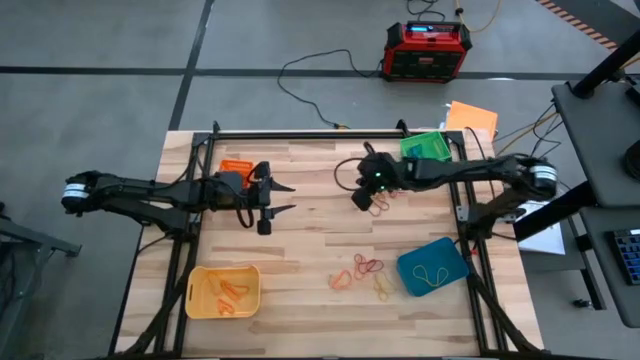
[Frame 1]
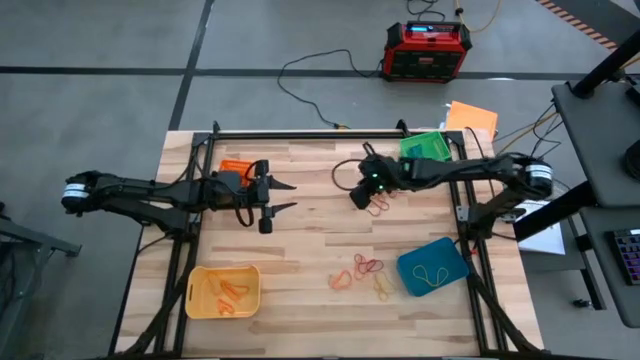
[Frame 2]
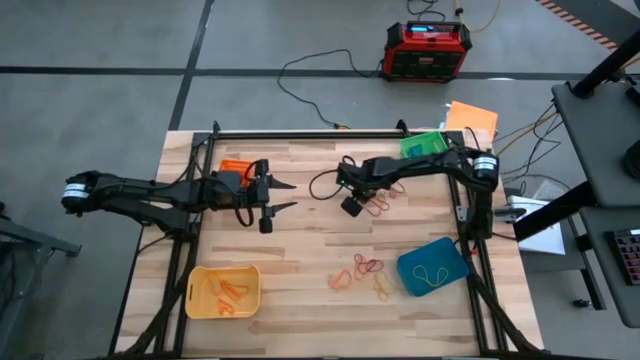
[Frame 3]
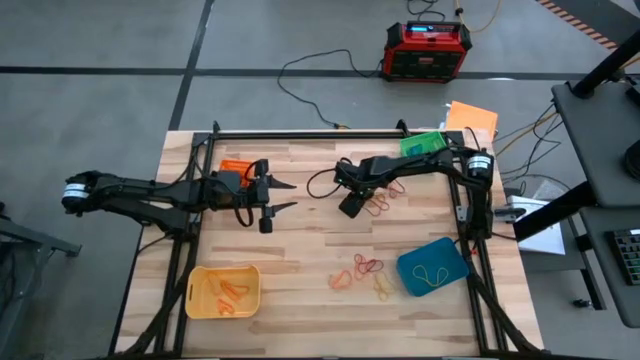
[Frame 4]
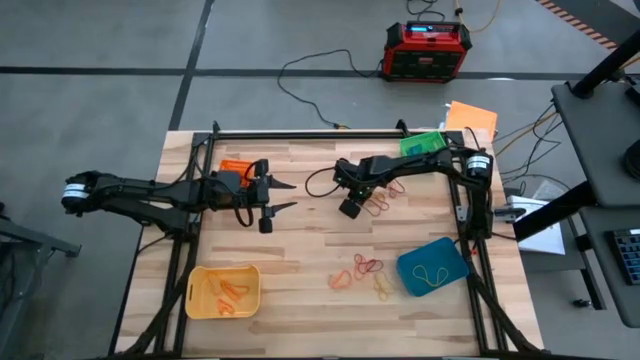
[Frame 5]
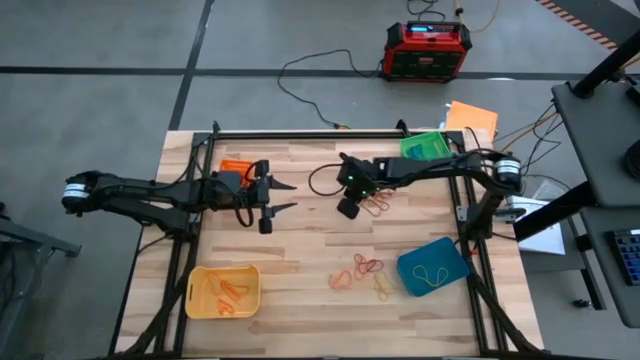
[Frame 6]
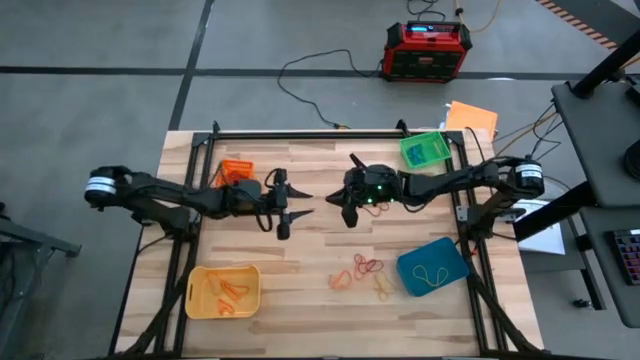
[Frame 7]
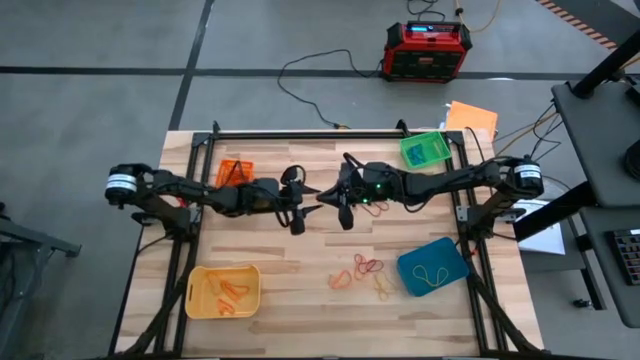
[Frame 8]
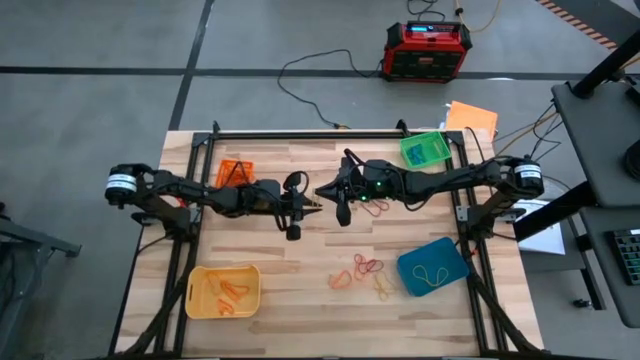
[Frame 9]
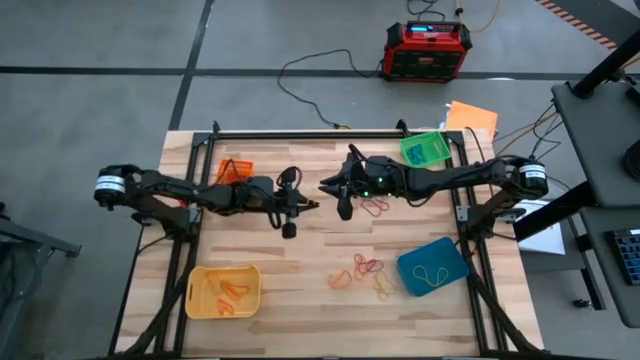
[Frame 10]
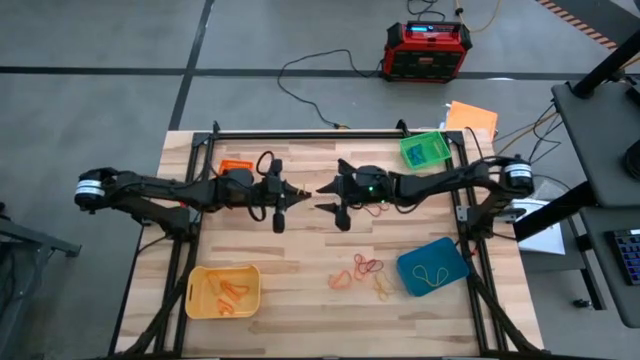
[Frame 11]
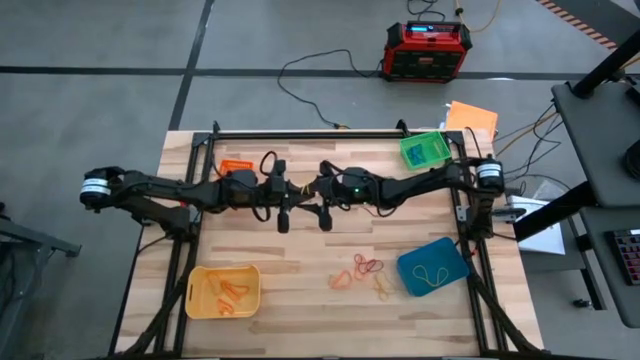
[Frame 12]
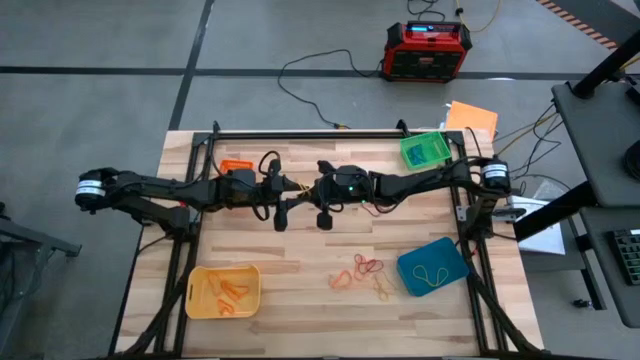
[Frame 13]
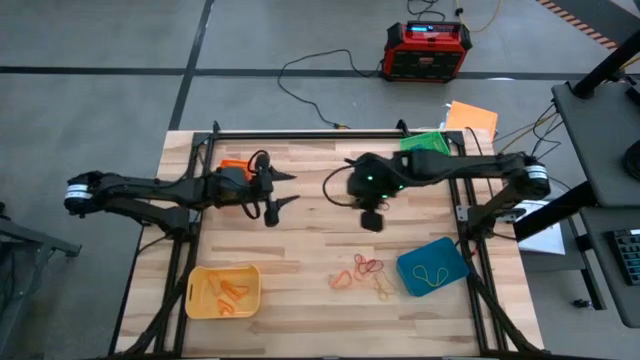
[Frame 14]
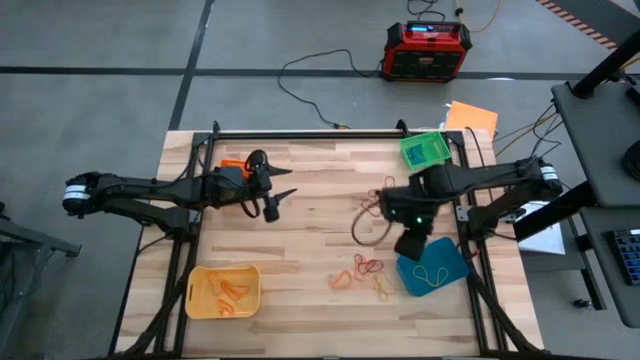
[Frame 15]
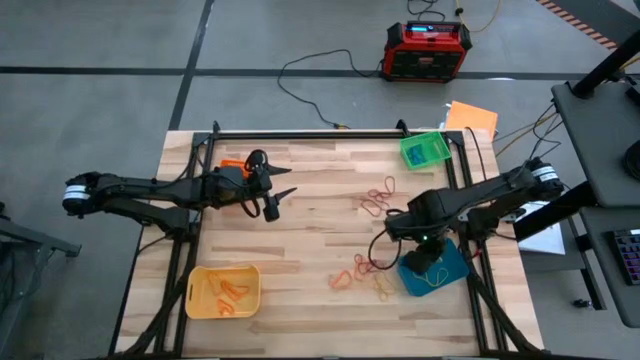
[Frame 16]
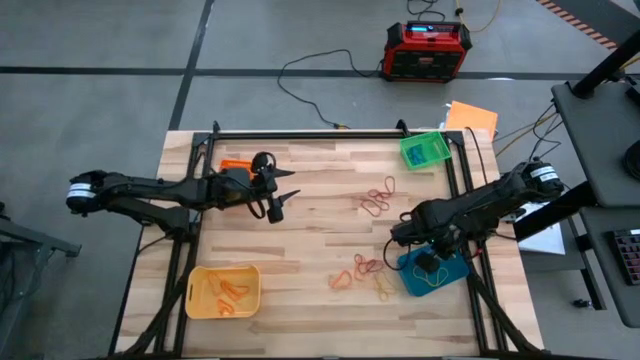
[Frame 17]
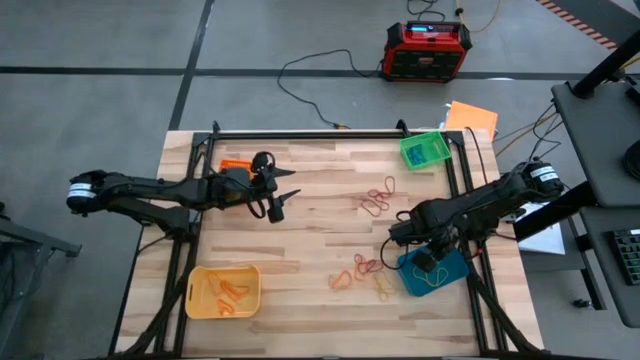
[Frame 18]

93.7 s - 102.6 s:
Task: Sort rubber bands into baskets
Put the yellow rubber band into the blue bin

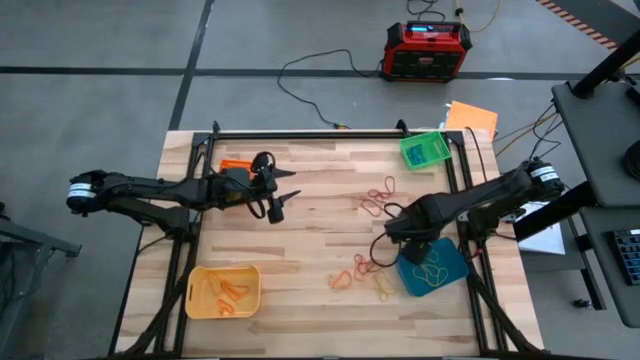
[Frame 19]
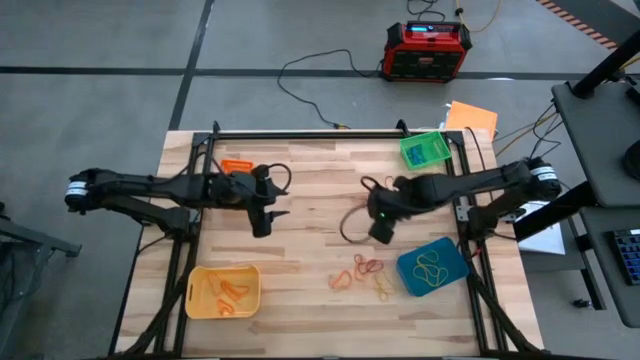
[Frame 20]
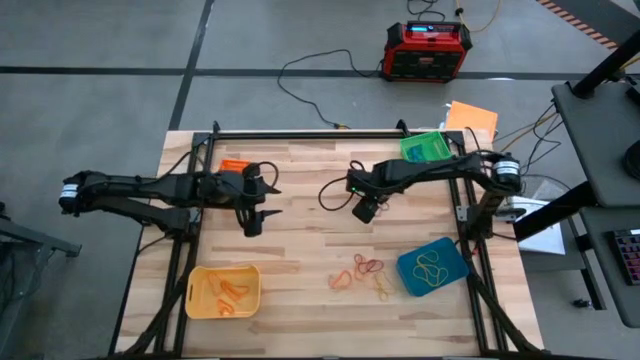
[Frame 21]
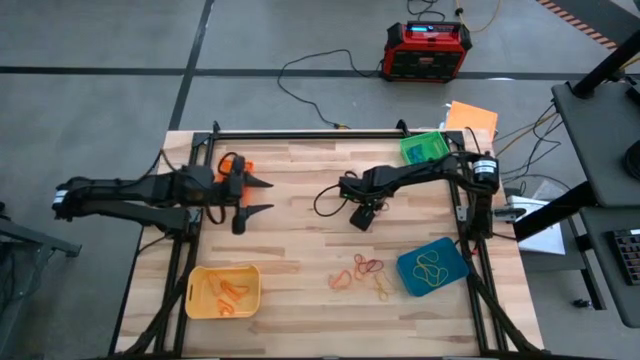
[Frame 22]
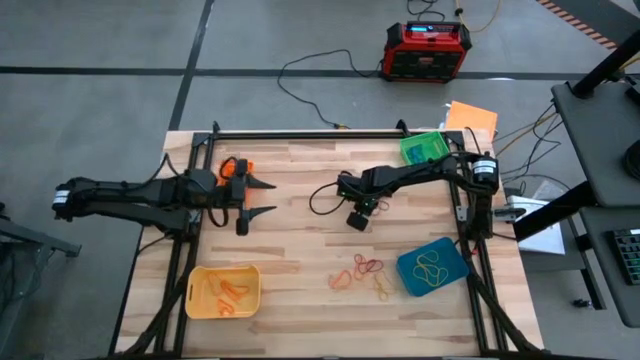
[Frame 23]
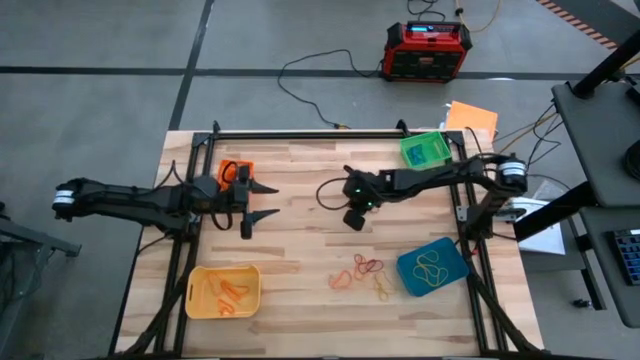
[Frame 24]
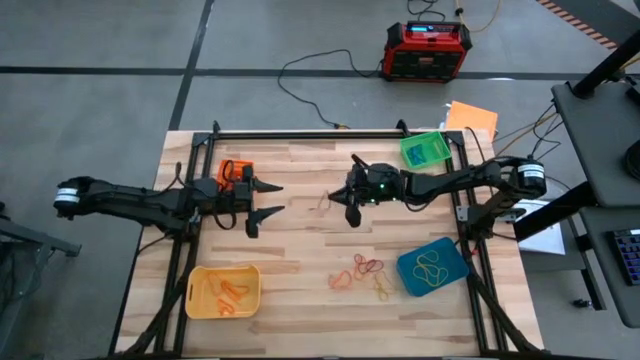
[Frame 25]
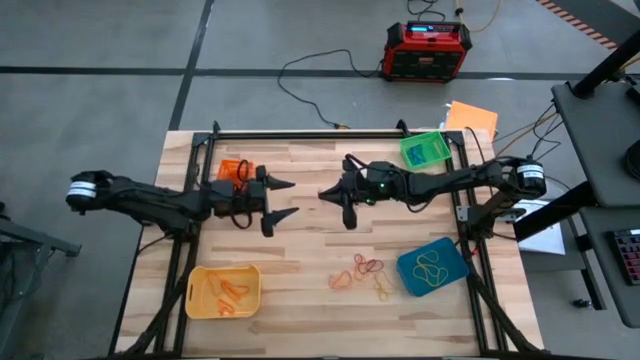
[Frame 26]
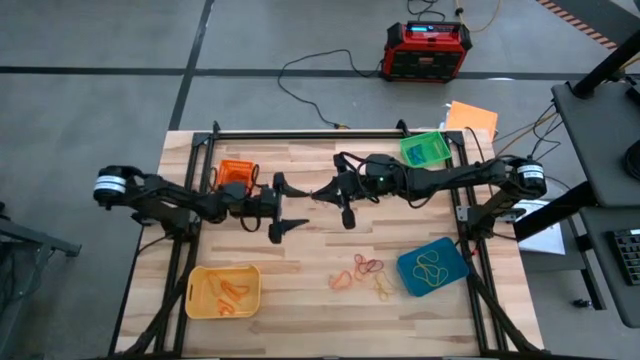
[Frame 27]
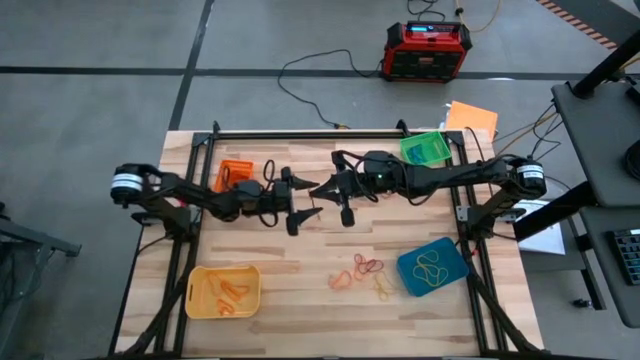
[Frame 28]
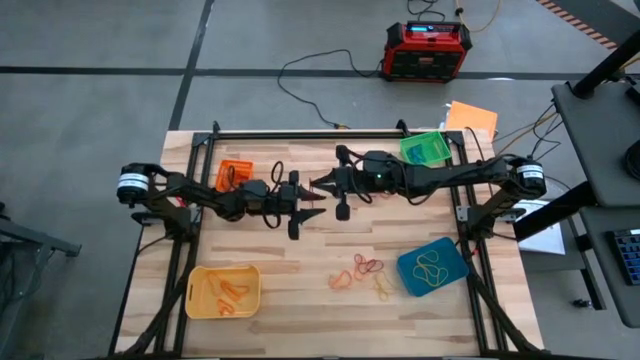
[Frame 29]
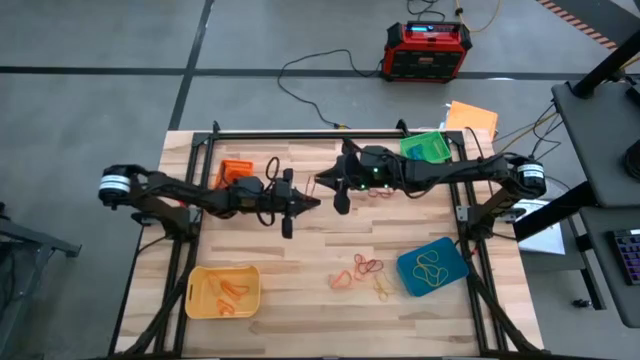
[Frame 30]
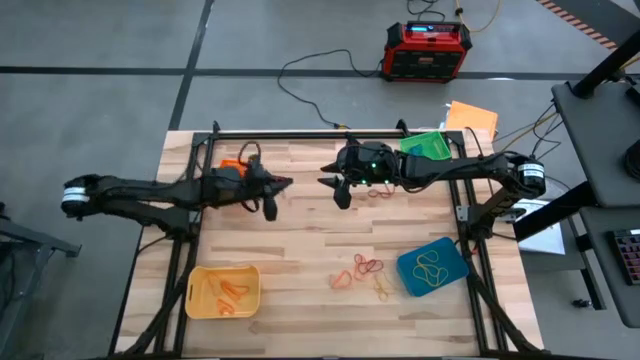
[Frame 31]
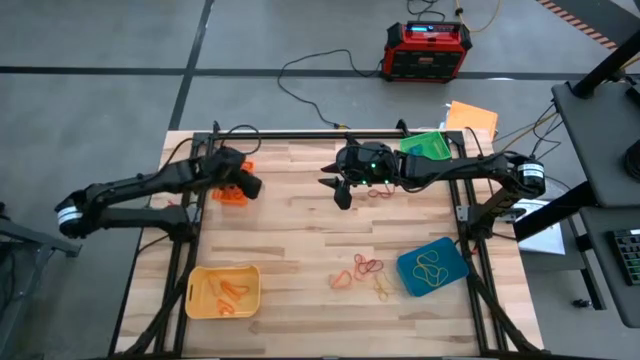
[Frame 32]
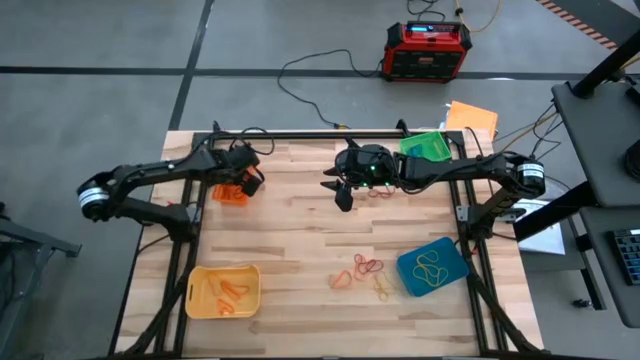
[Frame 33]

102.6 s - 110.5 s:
Put the red rubber band into the orange bin

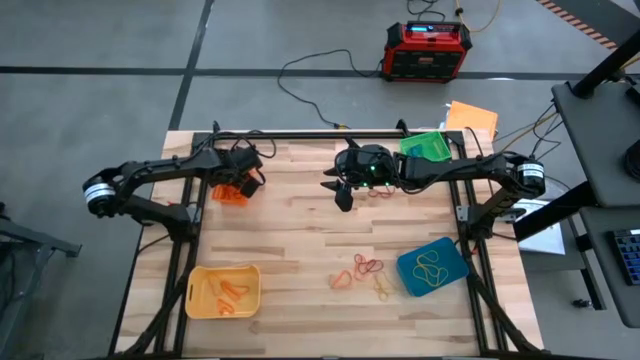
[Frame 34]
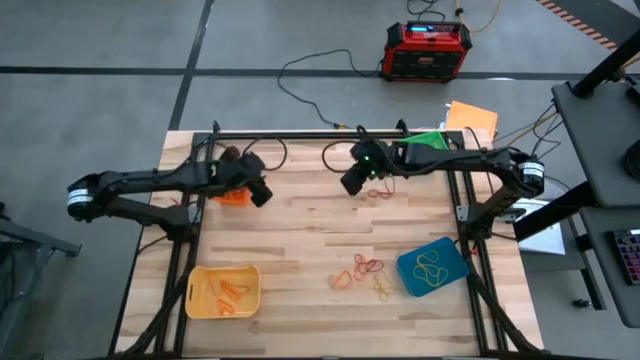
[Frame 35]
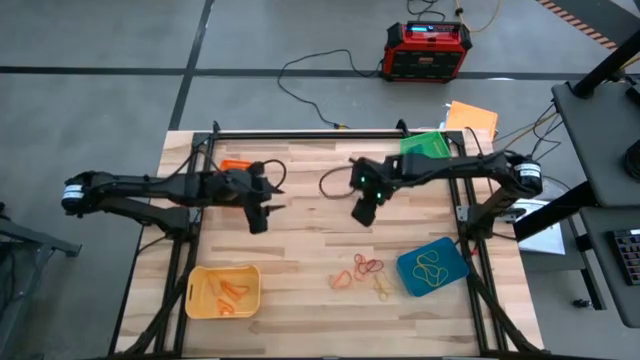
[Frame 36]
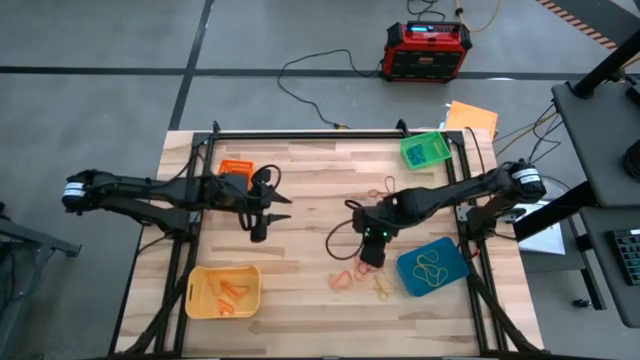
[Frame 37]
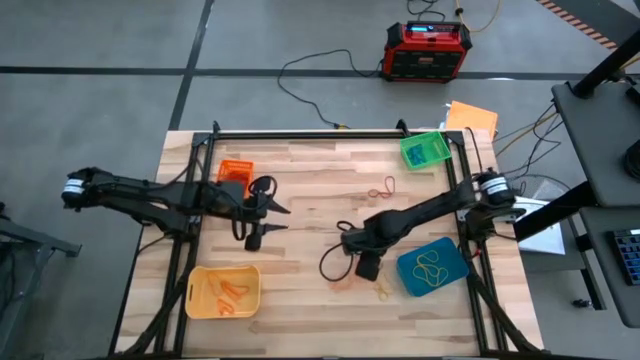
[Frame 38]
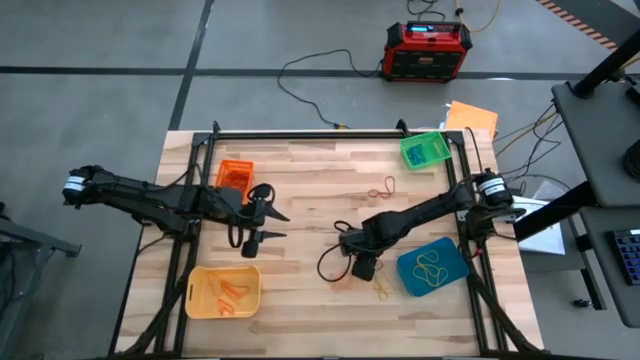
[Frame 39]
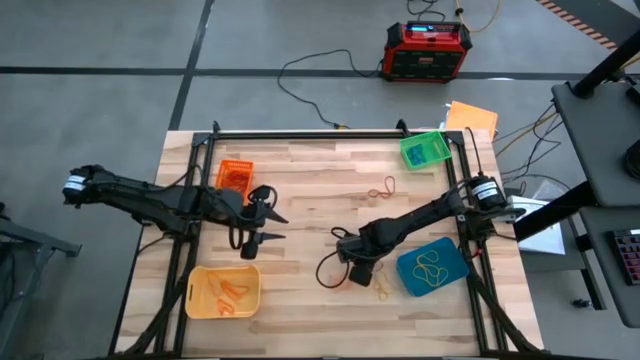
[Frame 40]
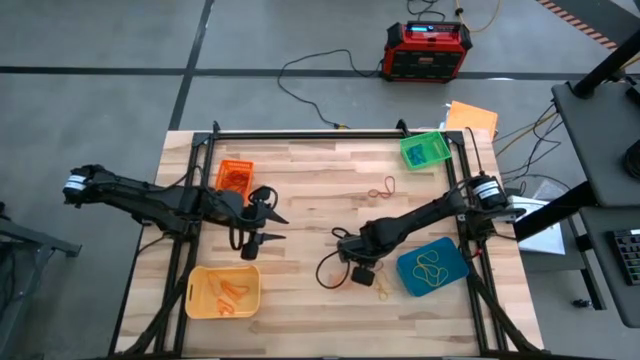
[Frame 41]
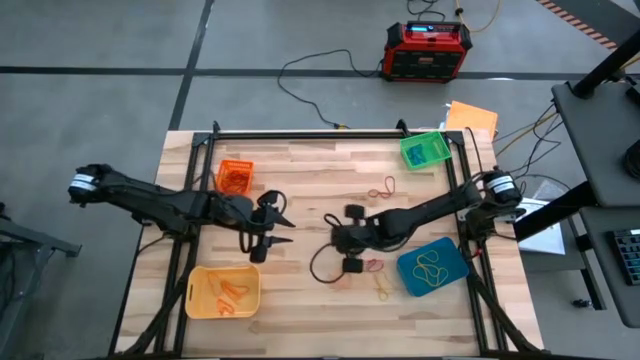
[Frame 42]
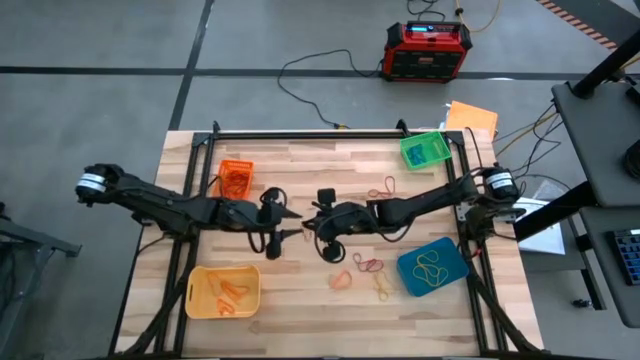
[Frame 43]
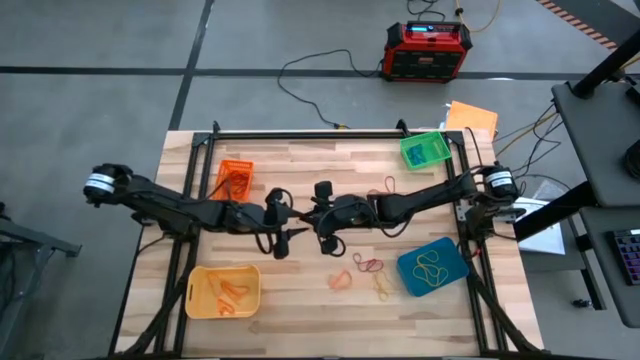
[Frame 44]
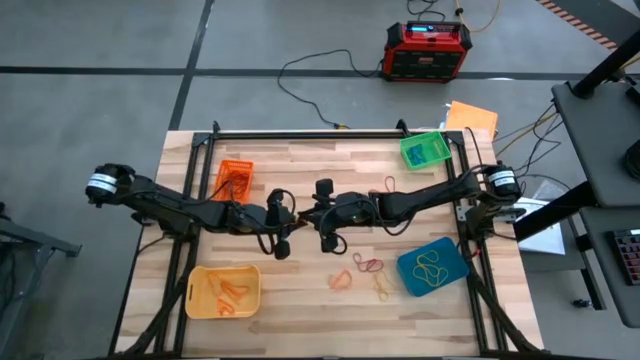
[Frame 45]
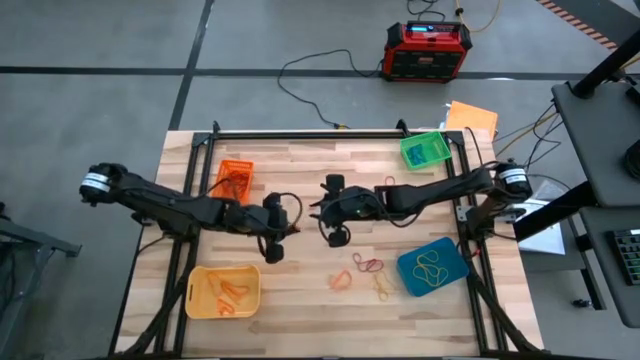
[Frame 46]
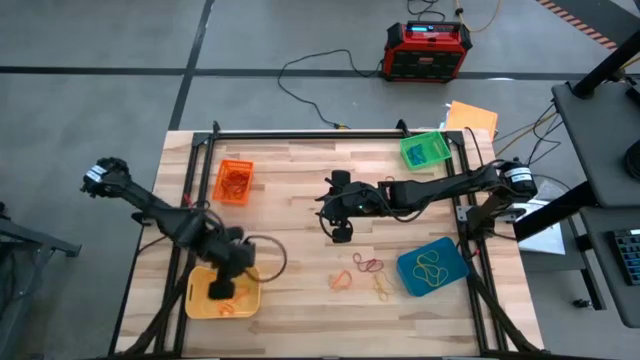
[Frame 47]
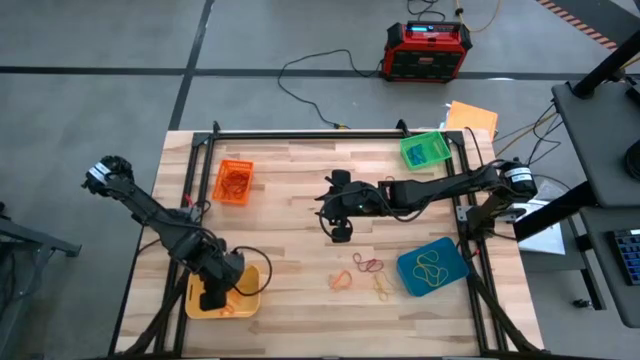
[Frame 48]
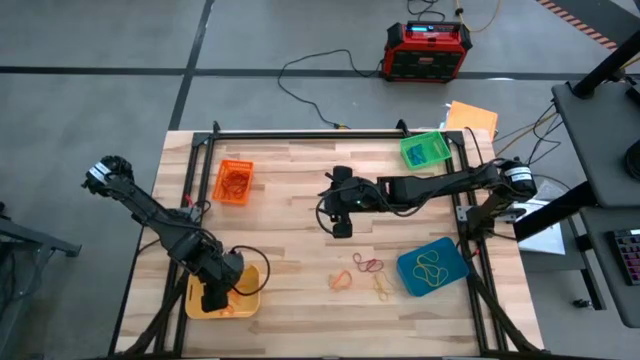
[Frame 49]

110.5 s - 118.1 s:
Put the orange rubber band into the yellow bin
